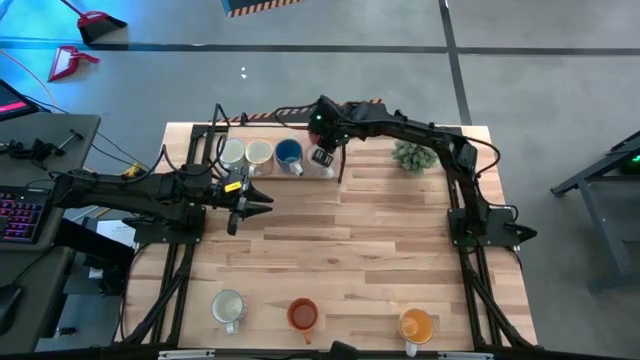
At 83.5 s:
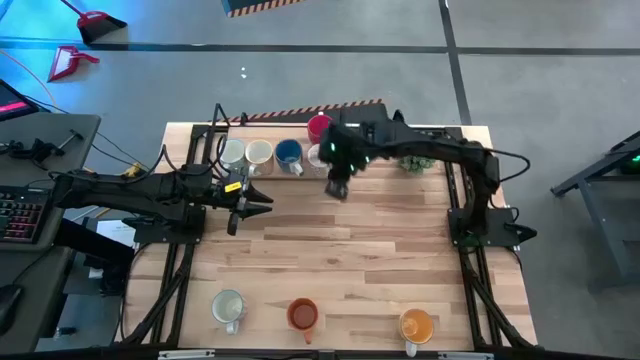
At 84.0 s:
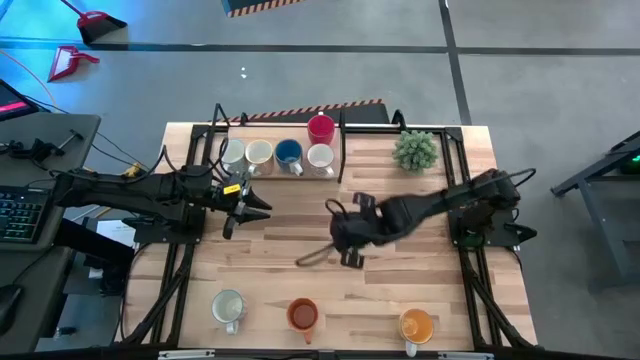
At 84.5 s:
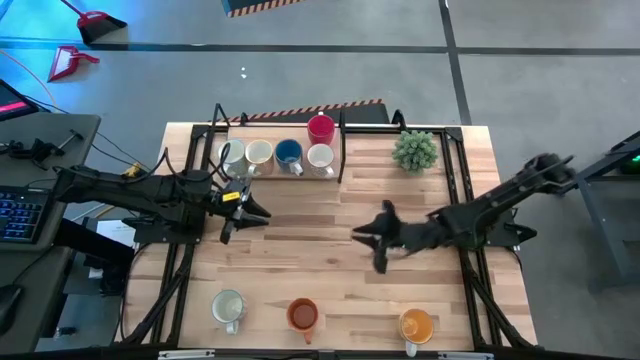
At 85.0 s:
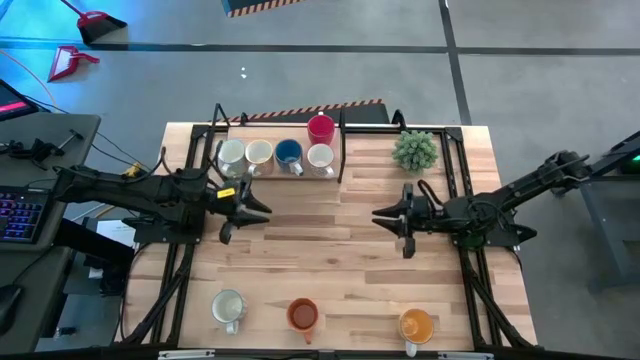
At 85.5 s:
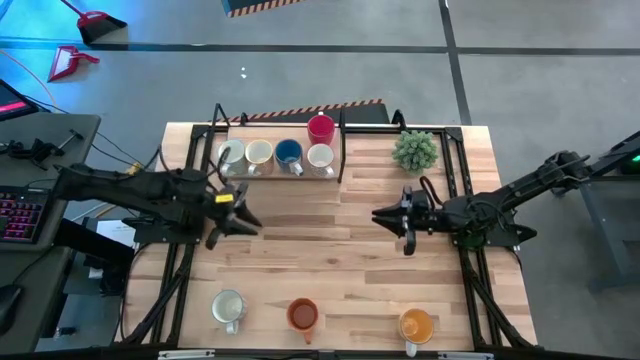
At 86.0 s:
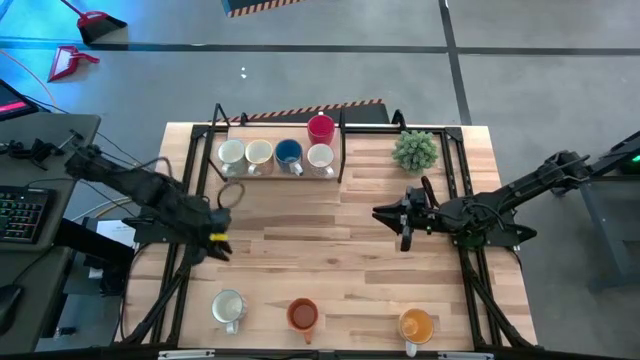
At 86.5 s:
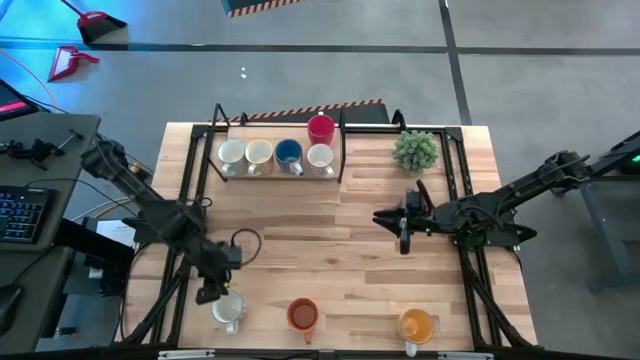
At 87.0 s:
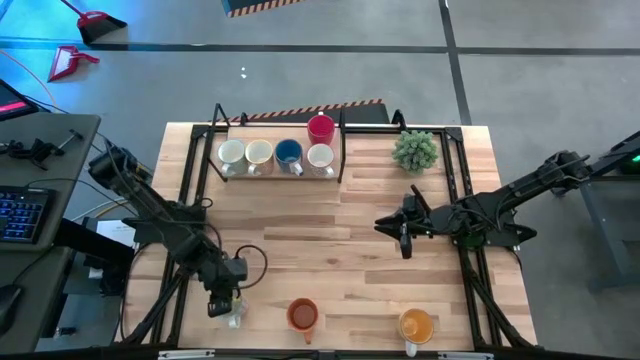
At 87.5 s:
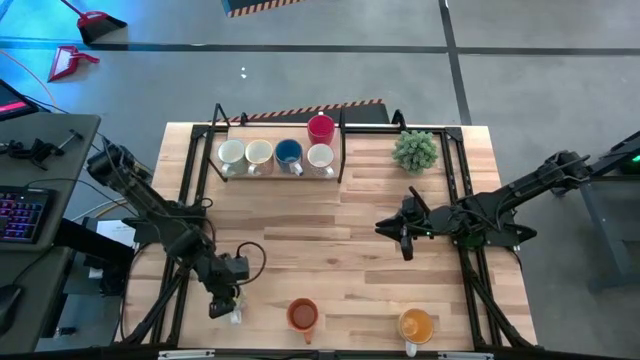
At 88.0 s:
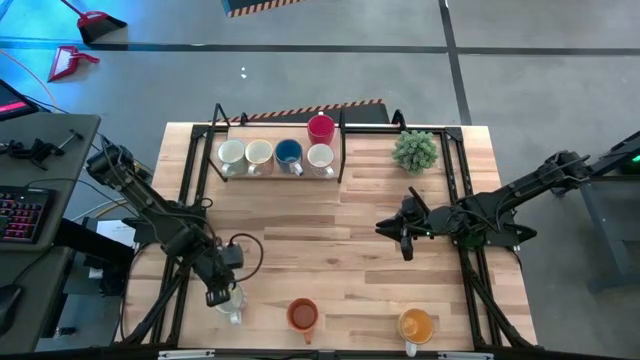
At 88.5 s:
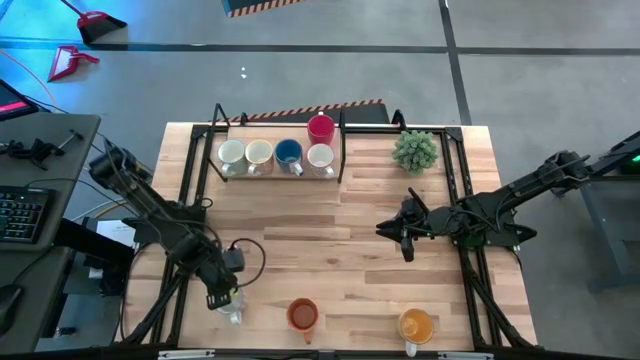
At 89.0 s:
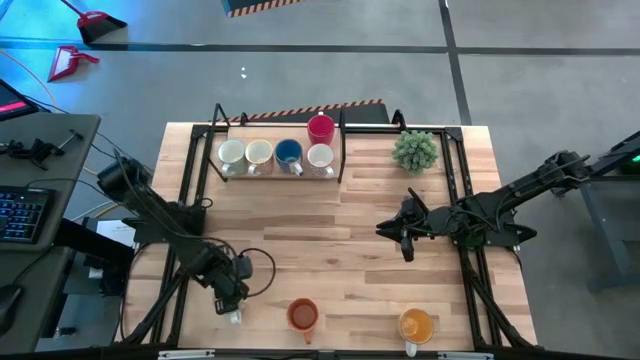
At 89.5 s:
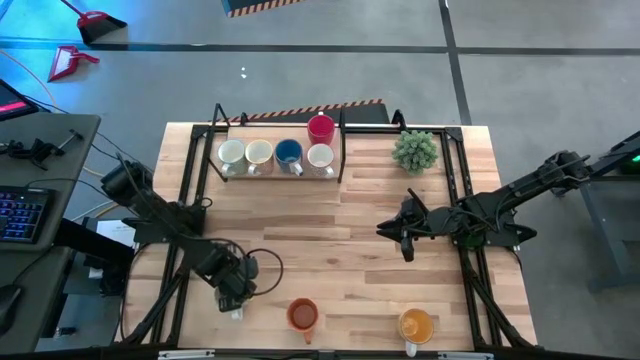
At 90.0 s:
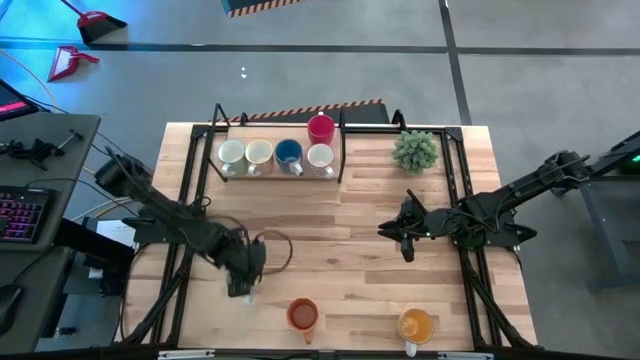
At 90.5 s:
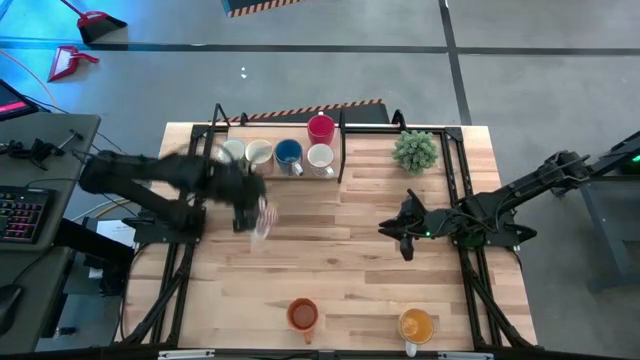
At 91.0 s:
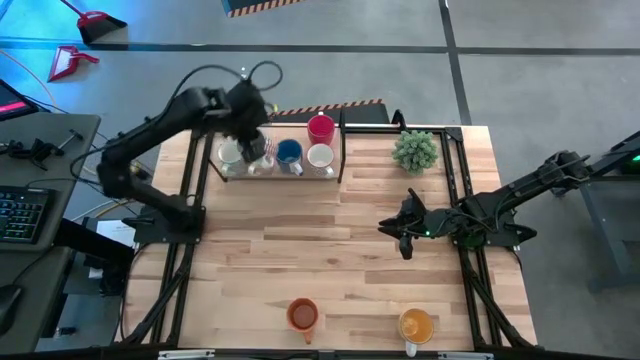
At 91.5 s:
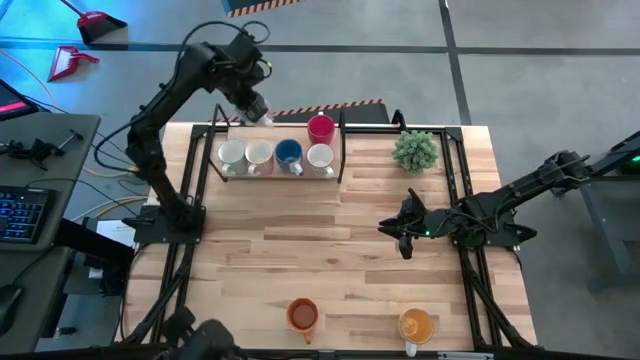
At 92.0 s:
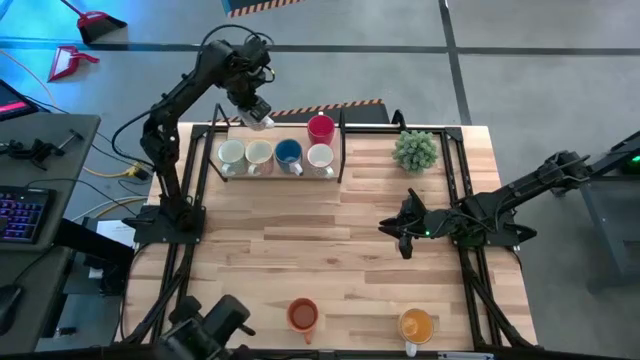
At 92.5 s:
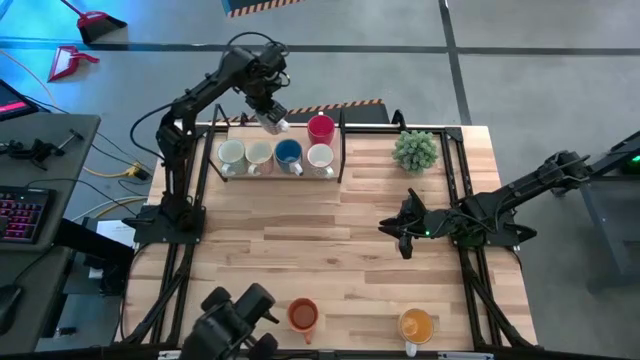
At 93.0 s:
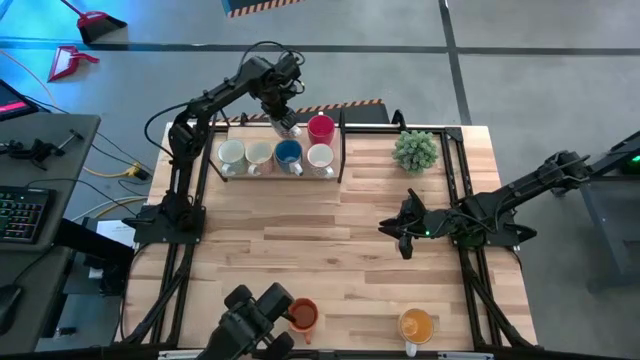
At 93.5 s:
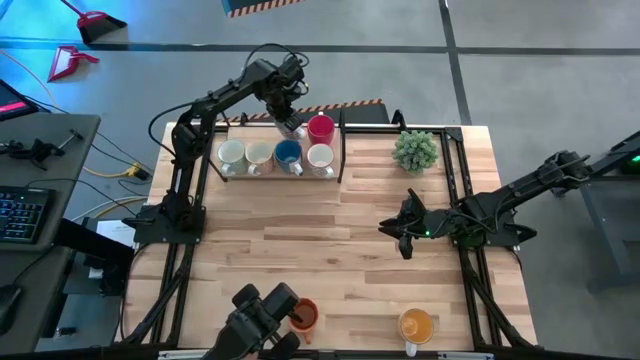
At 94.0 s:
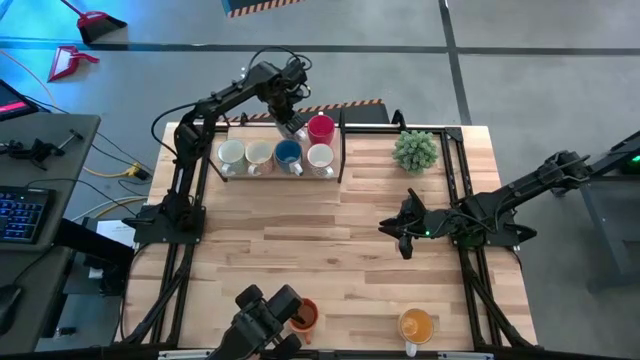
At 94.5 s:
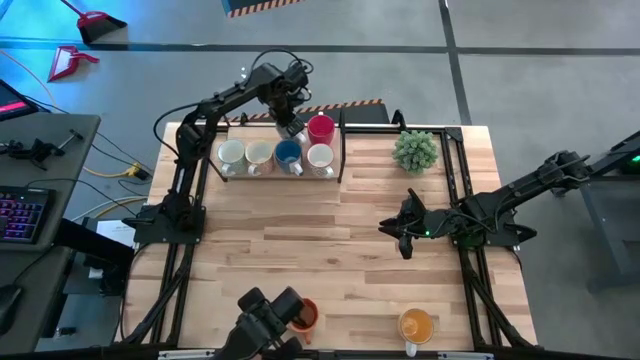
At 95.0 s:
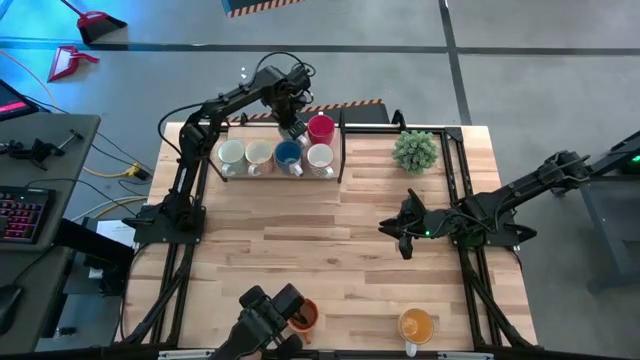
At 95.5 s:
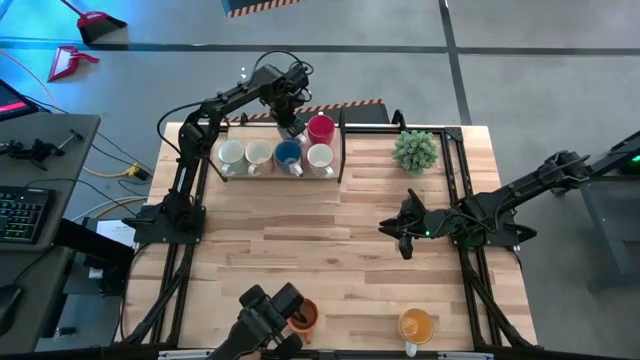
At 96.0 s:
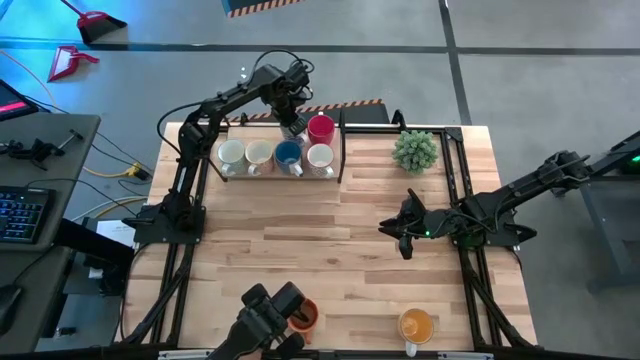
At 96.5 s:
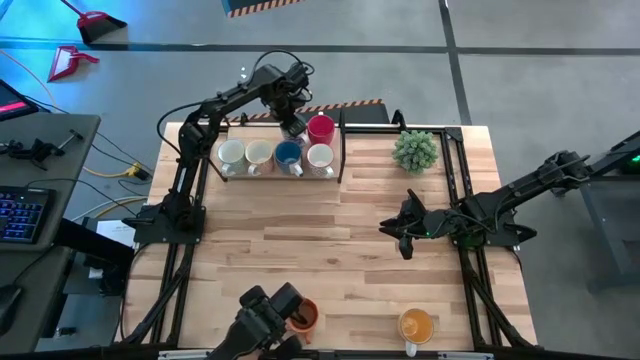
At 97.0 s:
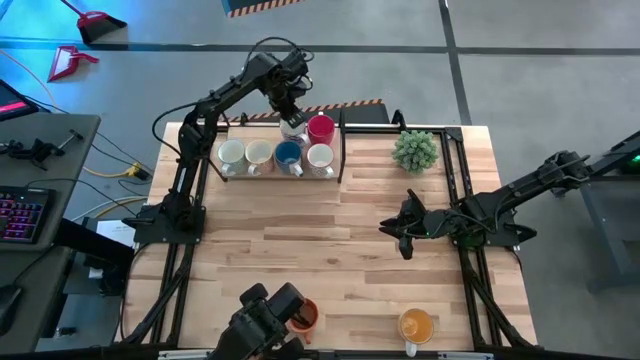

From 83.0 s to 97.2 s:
Task: Place coffee mugs
Put the red pattern mug on the shelf
